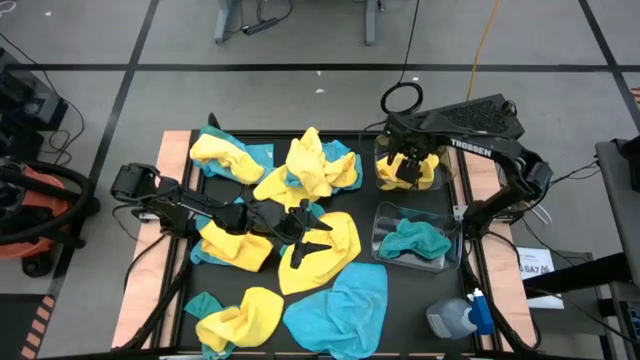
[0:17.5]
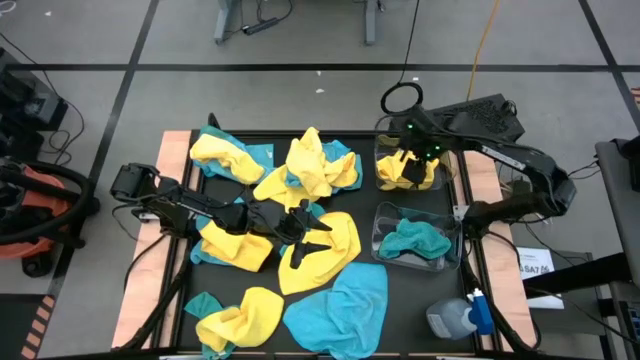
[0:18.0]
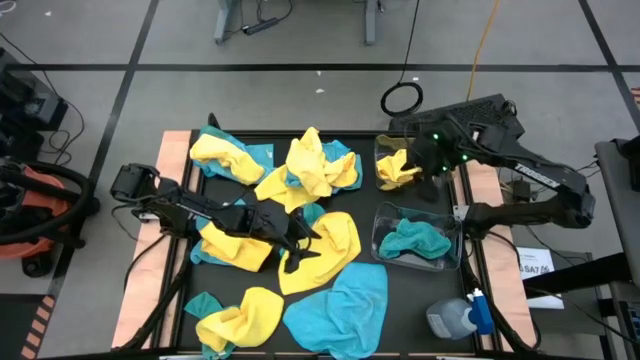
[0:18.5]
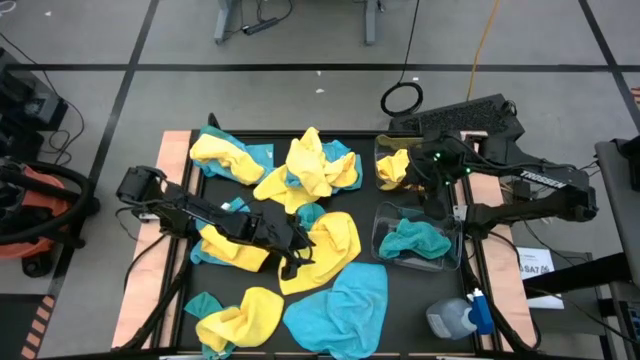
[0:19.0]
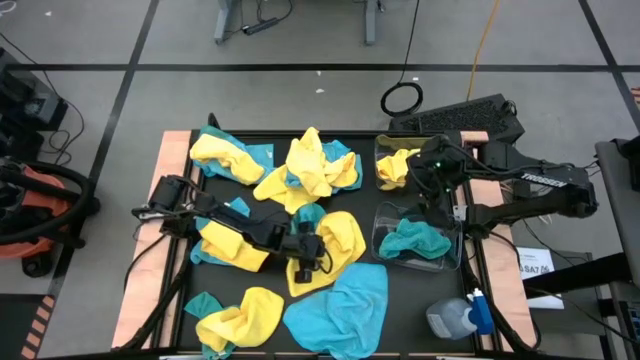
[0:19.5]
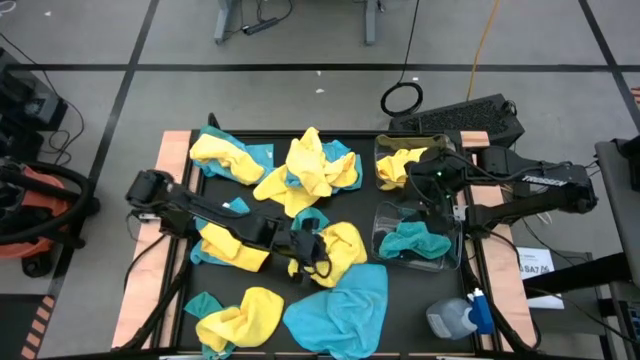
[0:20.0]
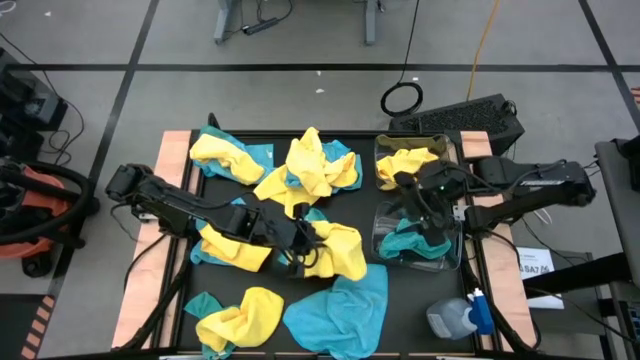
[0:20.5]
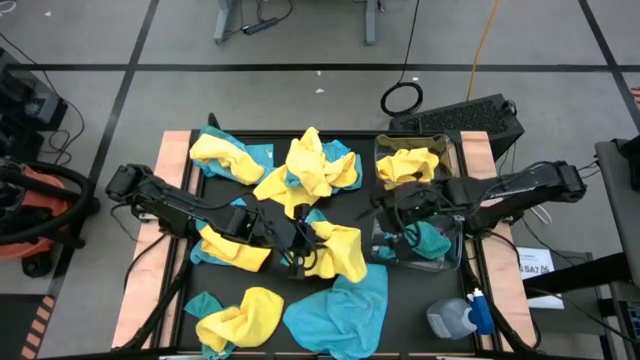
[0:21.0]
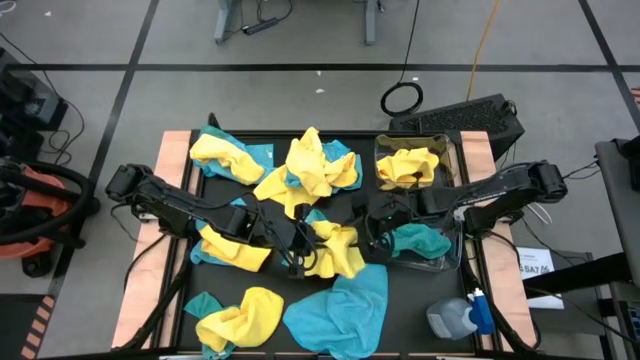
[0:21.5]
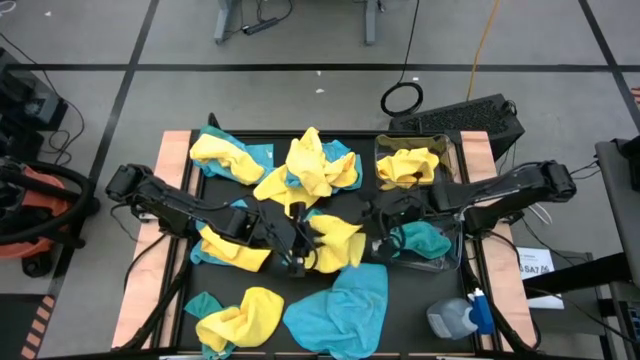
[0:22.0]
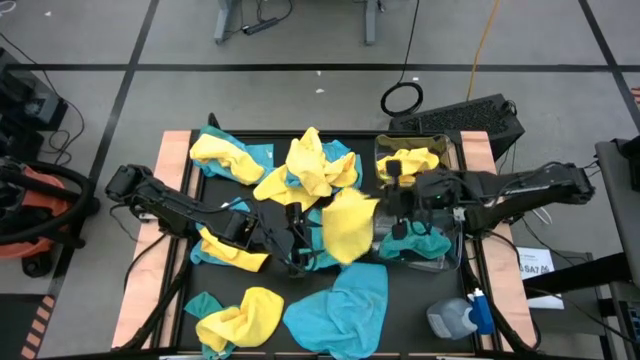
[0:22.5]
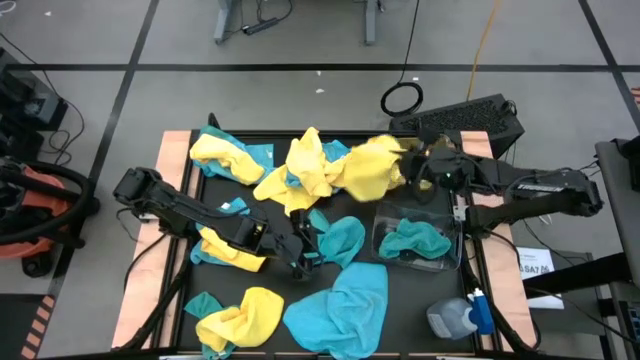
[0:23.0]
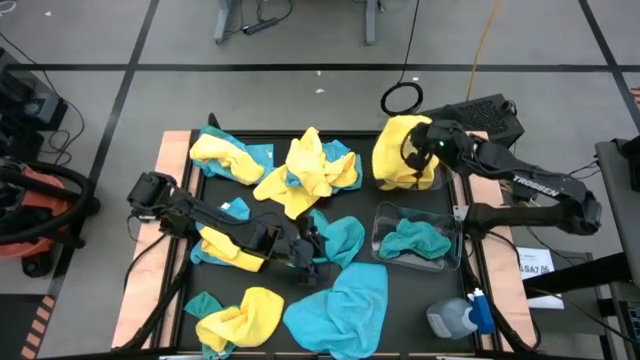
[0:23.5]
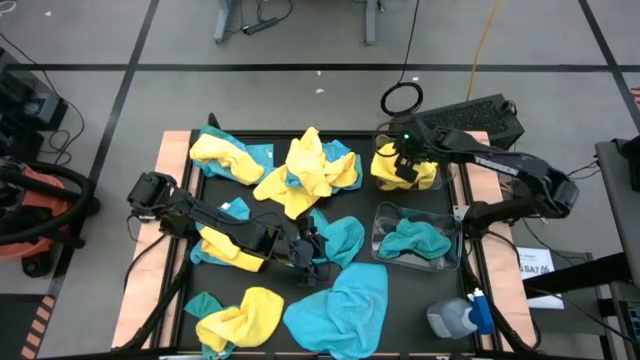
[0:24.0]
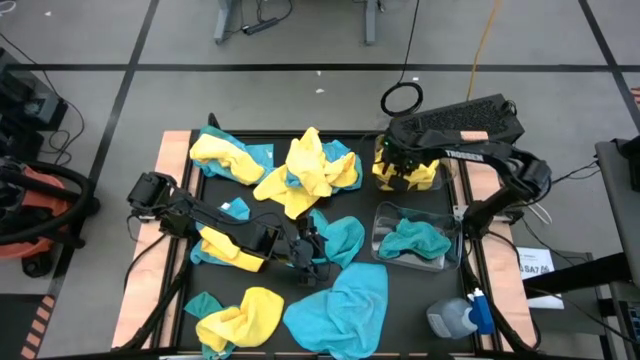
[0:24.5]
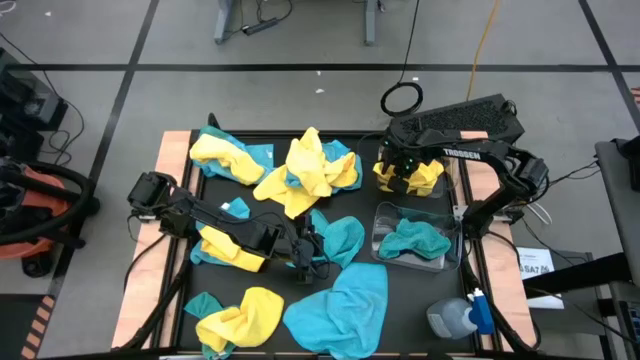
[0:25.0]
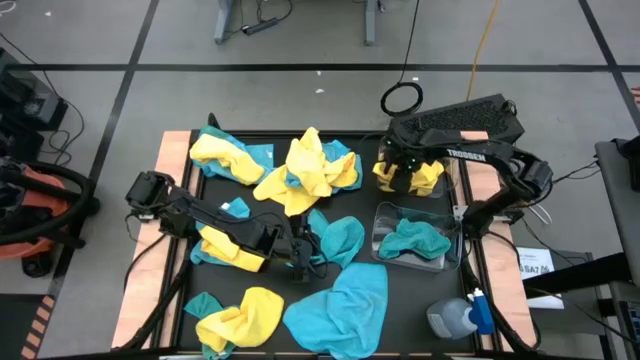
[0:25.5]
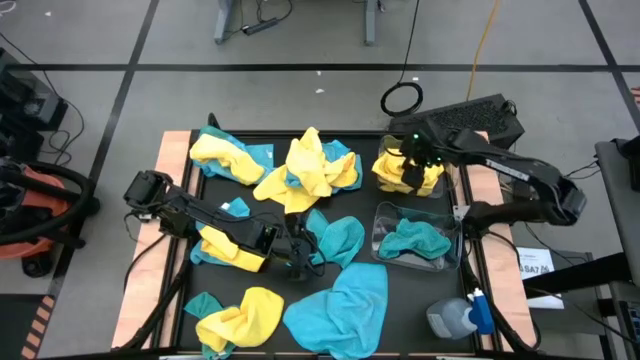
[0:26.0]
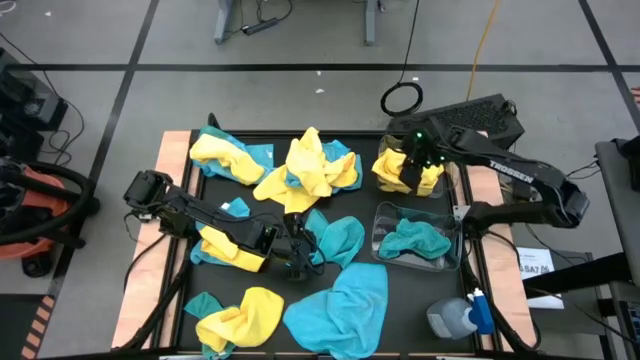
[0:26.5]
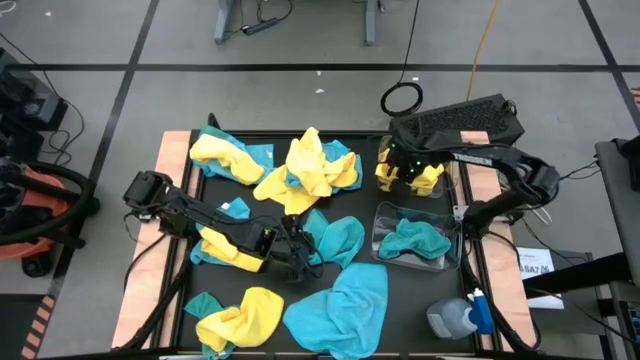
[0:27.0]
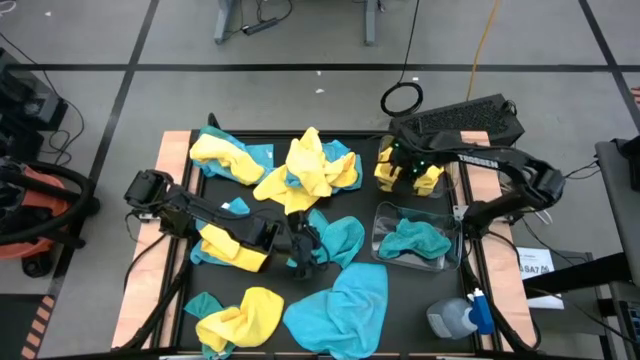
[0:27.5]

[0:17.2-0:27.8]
Task: Sort microfiber towel by color & place in baskets
Put the yellow microfiber cloth into the top transparent bin

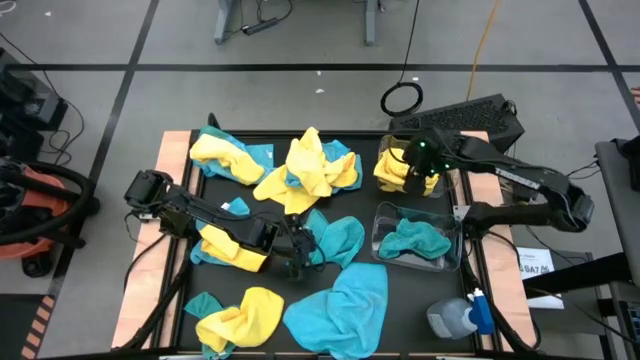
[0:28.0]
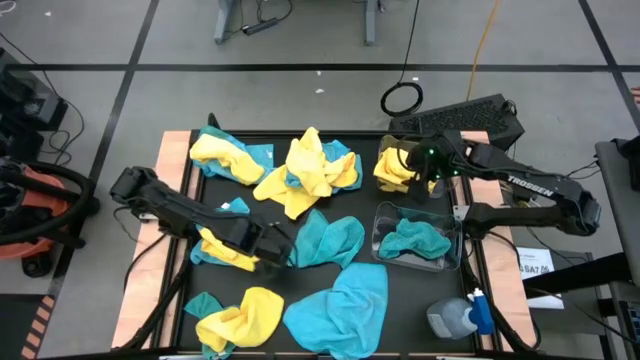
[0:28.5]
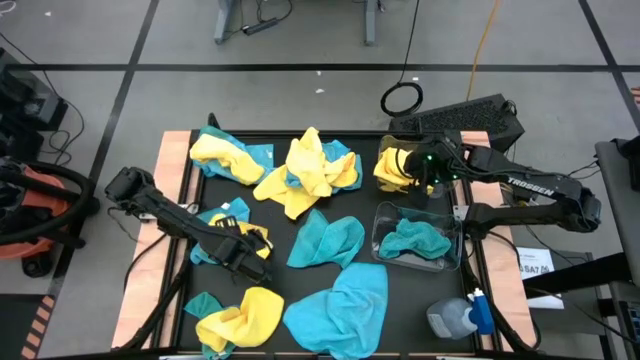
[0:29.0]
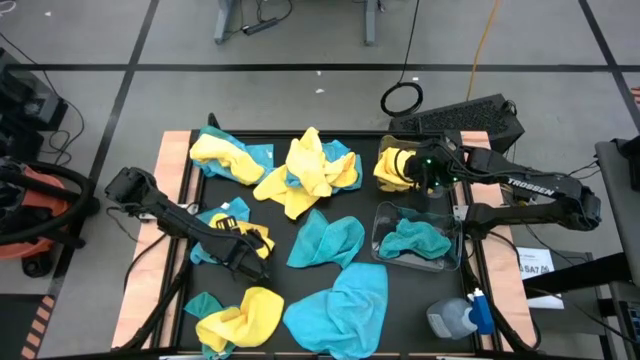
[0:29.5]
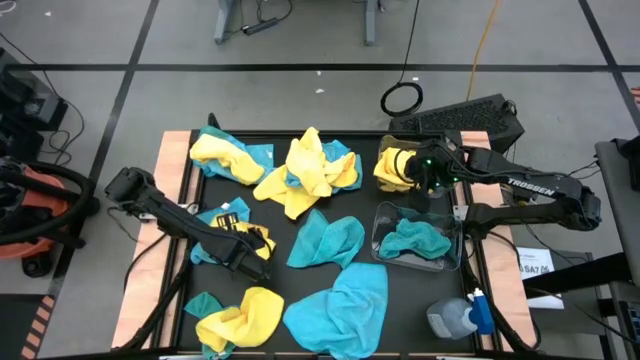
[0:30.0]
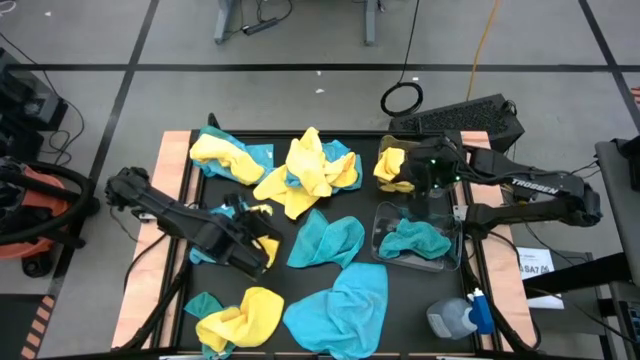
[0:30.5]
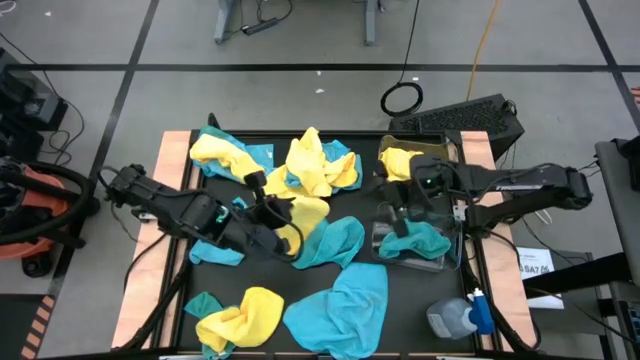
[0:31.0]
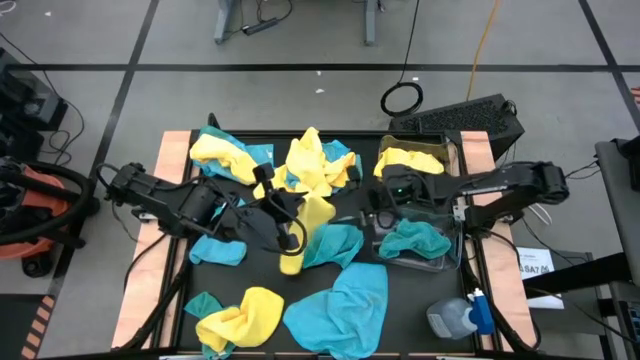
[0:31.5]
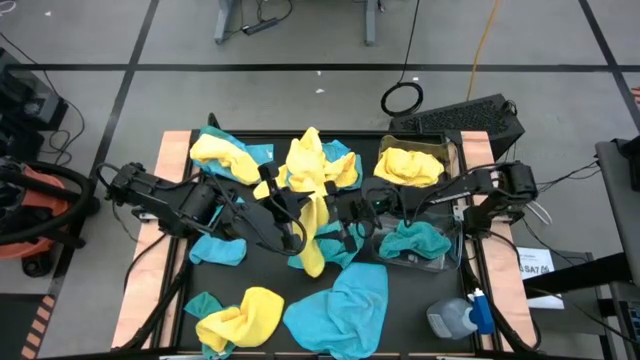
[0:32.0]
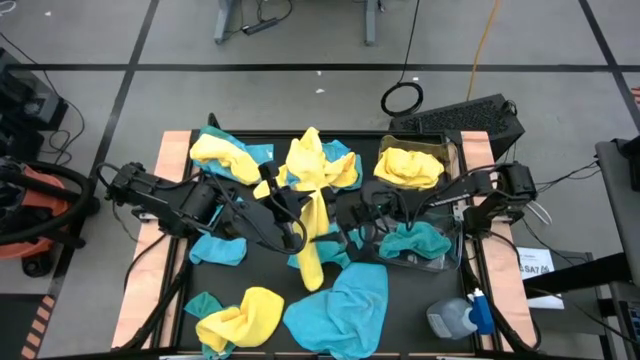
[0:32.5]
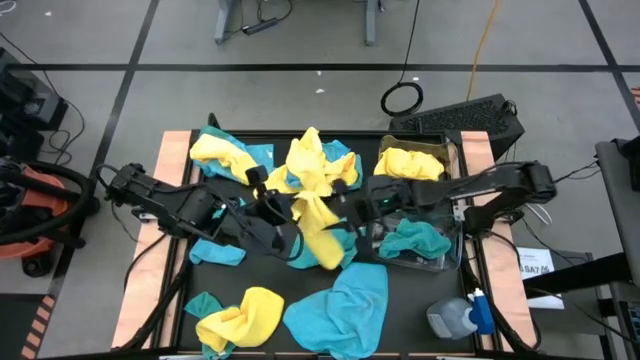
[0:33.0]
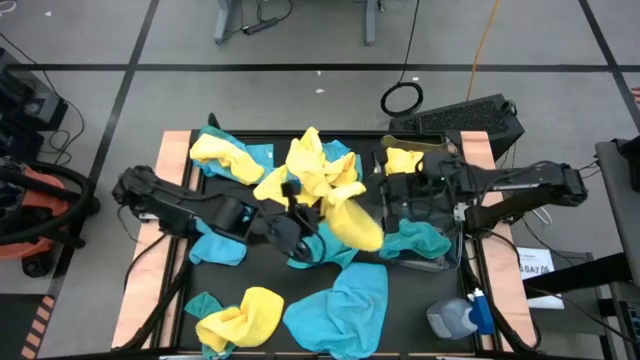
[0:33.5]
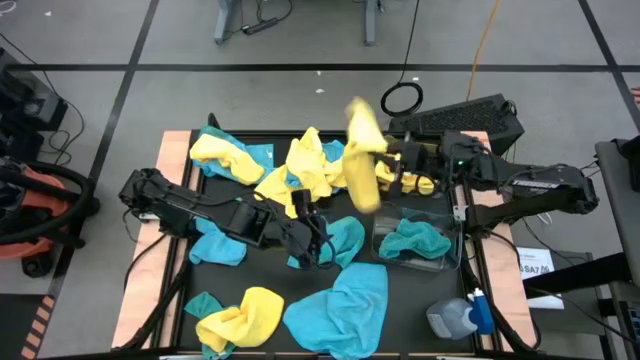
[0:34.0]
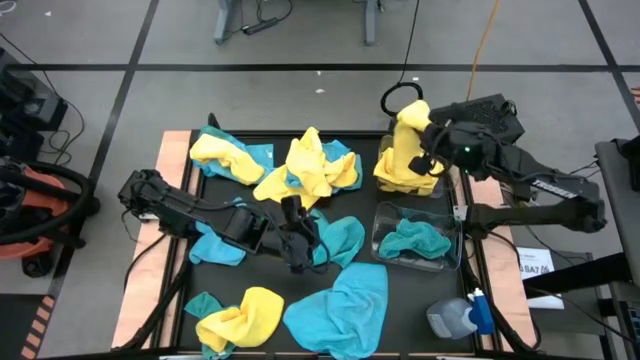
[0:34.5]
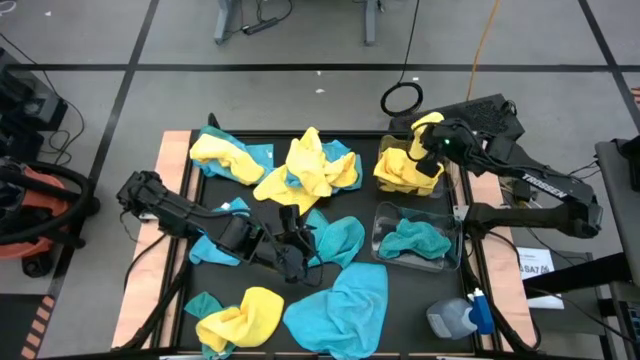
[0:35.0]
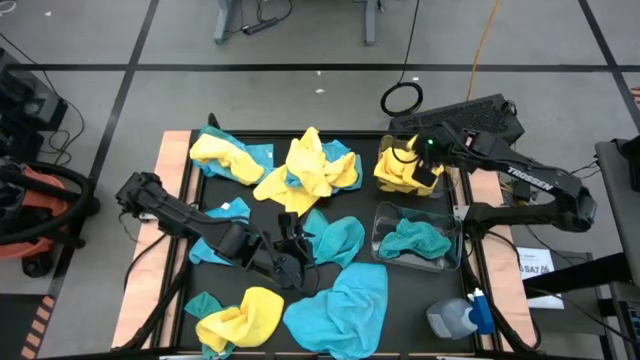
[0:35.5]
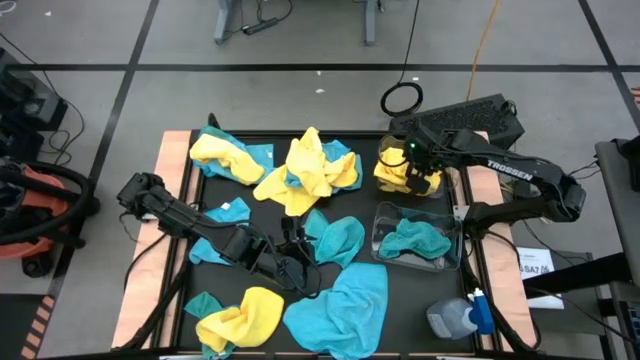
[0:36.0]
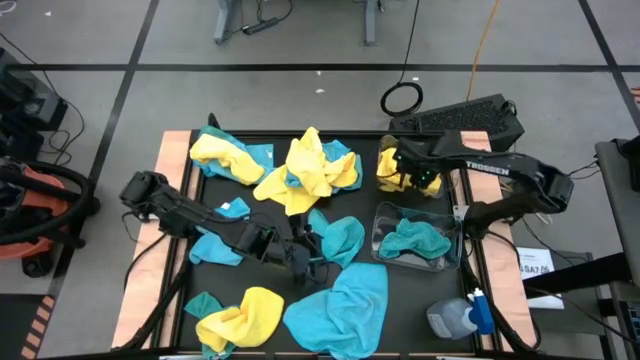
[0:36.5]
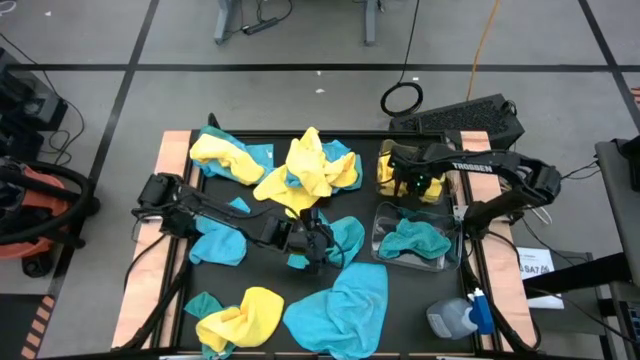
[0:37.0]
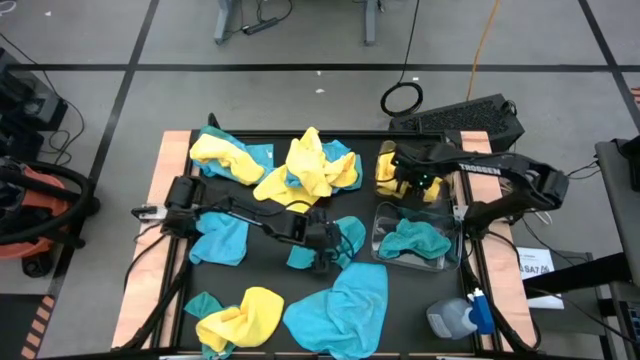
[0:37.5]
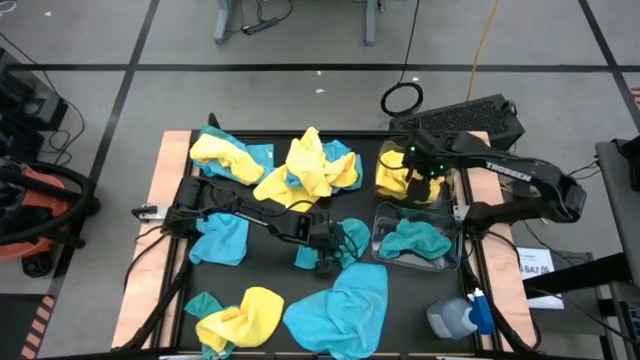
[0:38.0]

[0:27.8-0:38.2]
Put the yellow microfiber cloth into the top transparent bin
